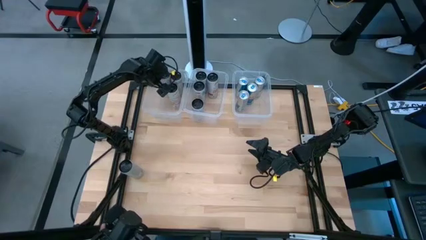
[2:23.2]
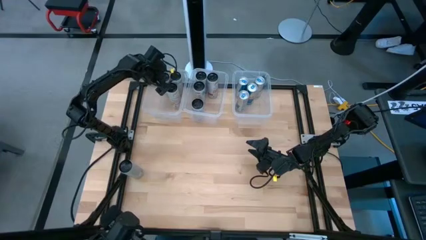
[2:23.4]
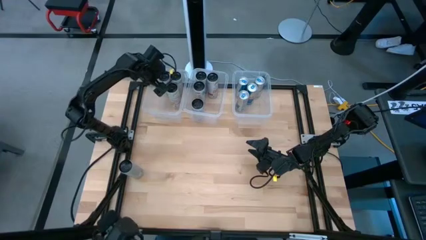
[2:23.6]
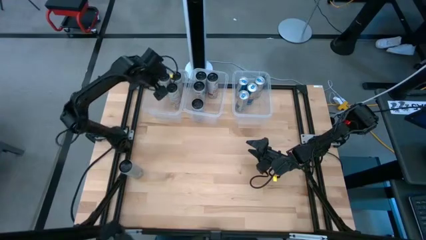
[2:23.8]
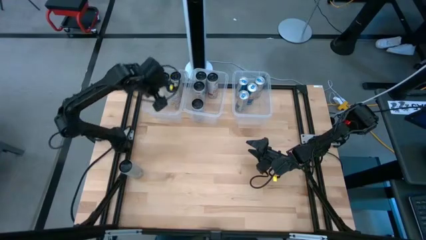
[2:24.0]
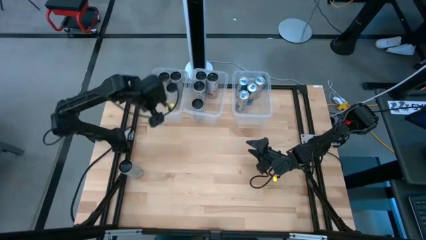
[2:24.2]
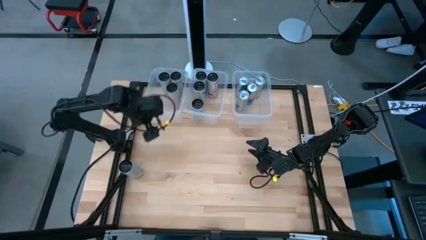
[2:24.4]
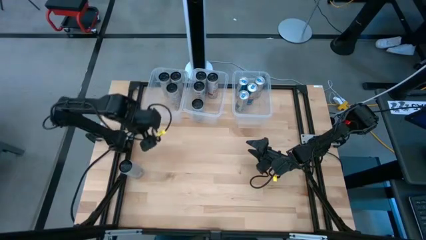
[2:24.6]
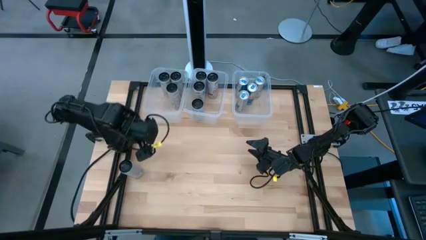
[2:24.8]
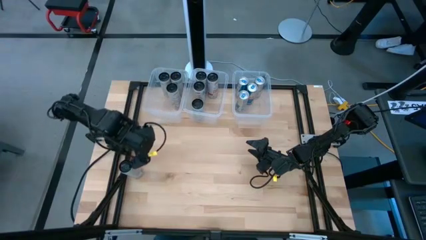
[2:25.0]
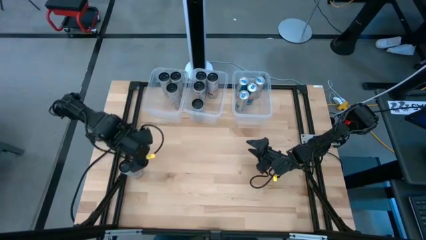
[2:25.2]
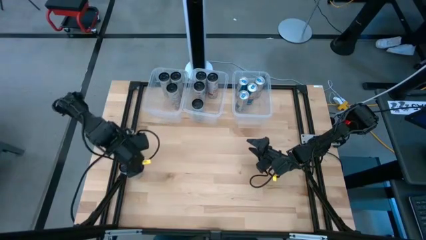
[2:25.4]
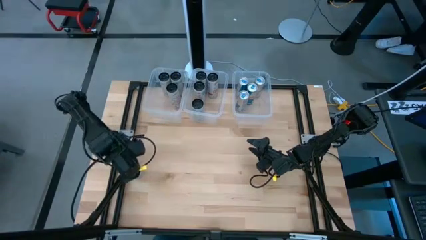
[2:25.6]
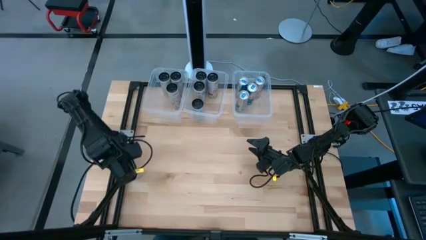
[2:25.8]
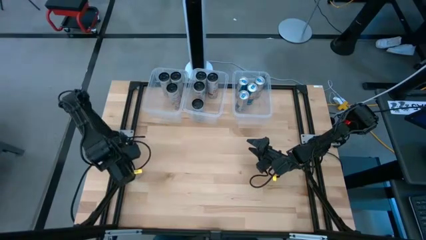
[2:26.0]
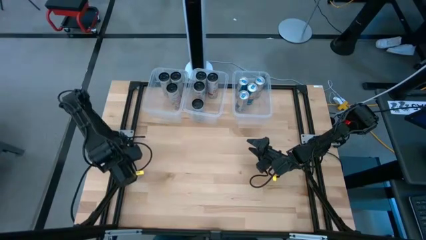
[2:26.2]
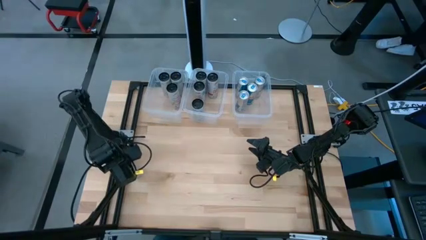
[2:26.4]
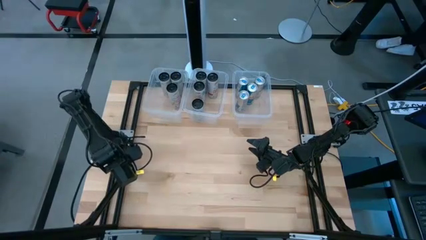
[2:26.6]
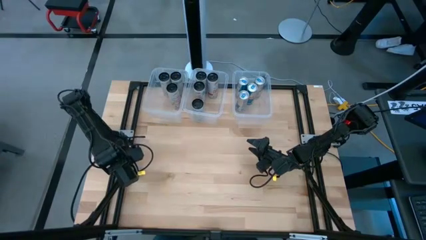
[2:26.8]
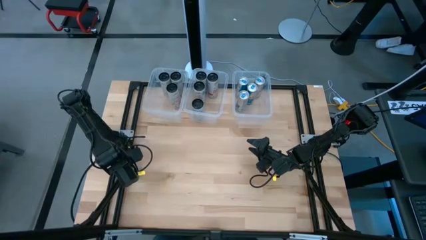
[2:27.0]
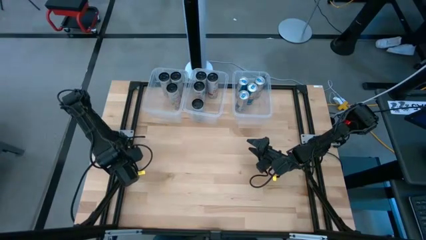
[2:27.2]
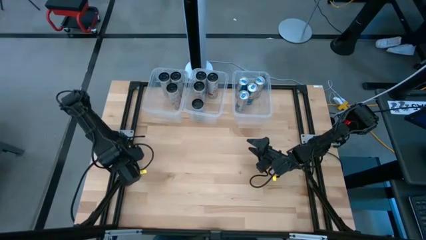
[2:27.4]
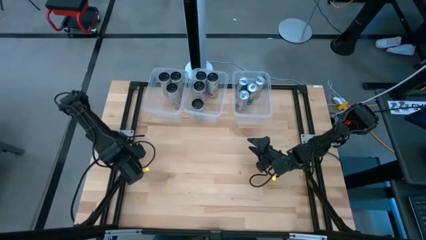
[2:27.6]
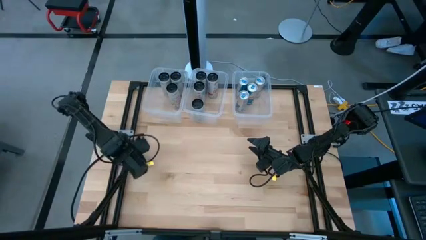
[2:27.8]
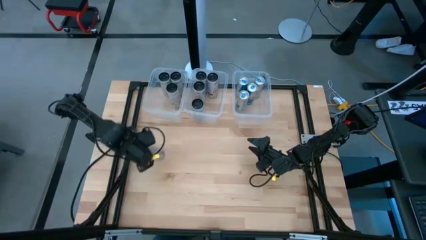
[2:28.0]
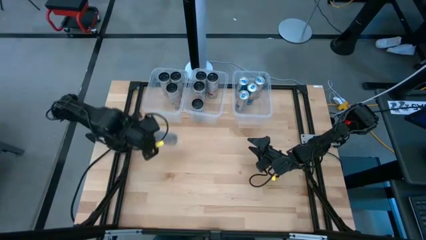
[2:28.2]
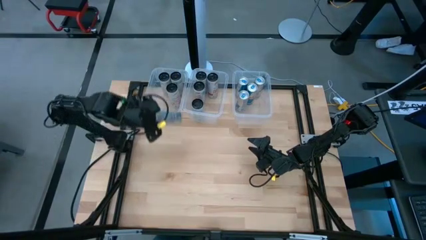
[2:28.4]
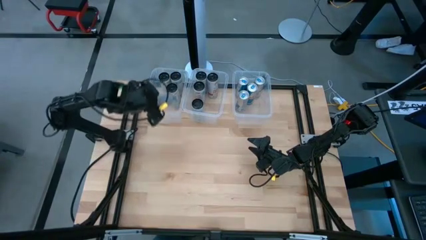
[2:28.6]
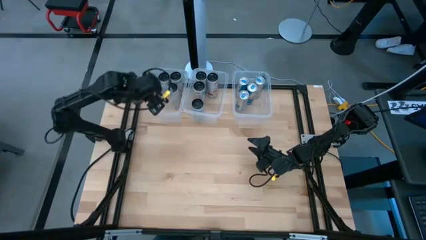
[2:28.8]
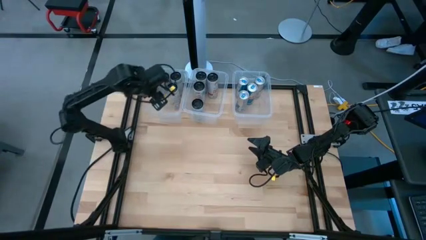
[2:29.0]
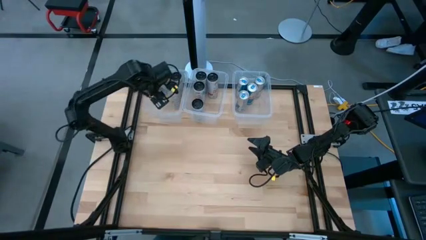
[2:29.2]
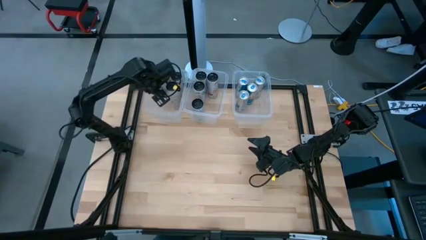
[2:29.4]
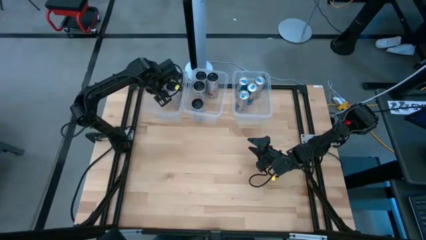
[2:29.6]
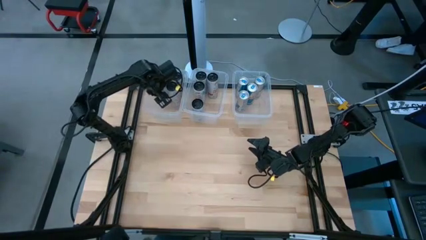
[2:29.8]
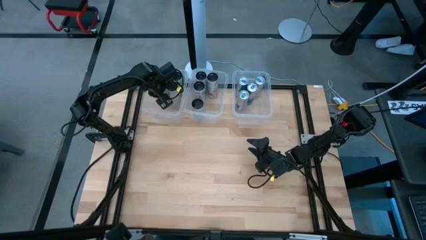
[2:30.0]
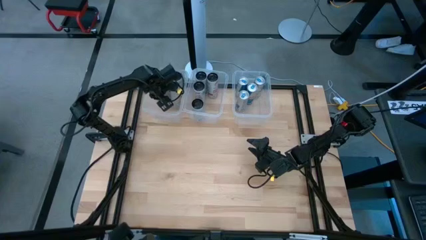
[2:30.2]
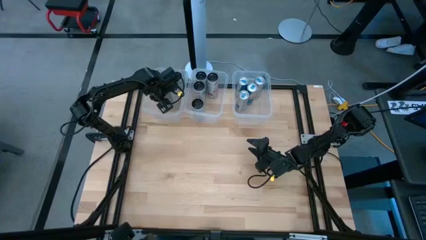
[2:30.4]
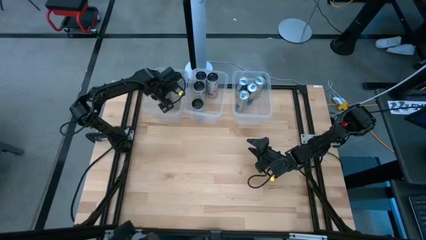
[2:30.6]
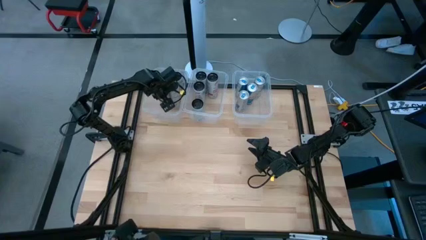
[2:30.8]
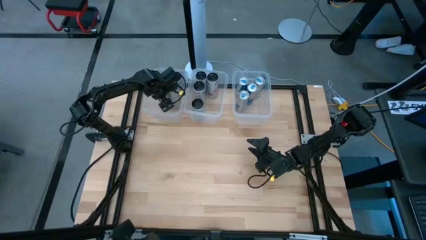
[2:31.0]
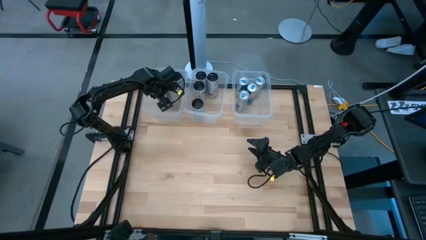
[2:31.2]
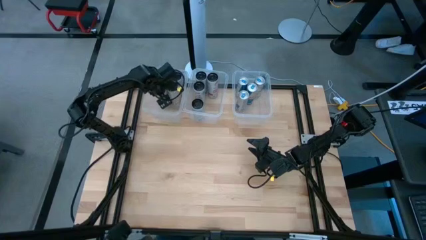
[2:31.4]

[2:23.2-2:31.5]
Task: Sort soda cans
Put the white-yellow soda can into the left transparent bin

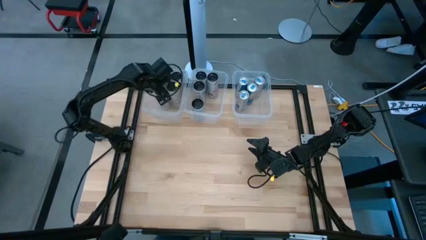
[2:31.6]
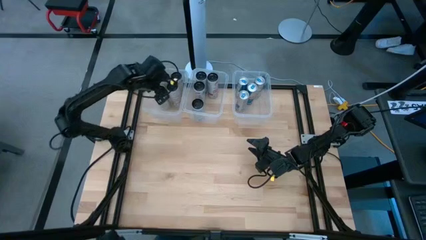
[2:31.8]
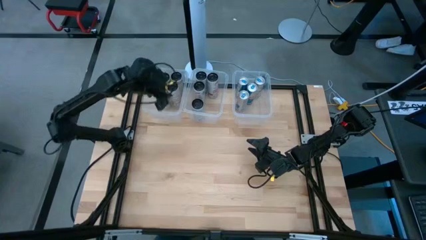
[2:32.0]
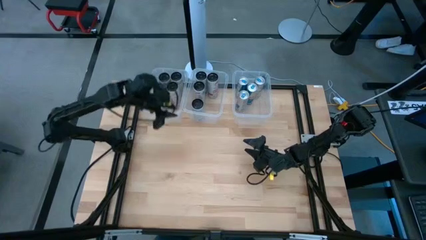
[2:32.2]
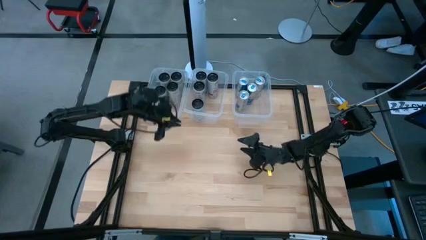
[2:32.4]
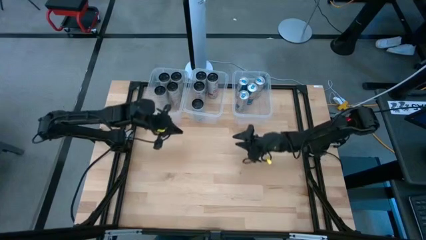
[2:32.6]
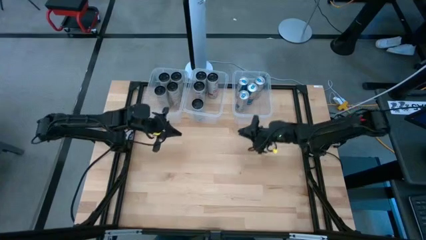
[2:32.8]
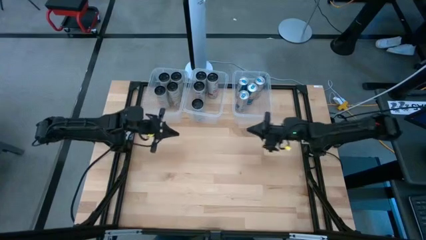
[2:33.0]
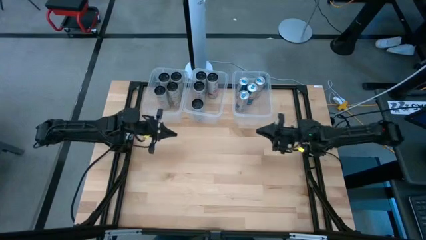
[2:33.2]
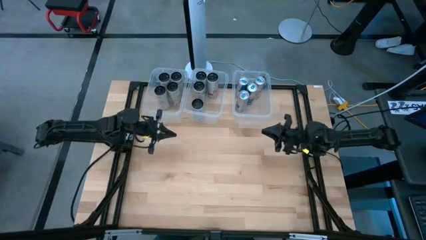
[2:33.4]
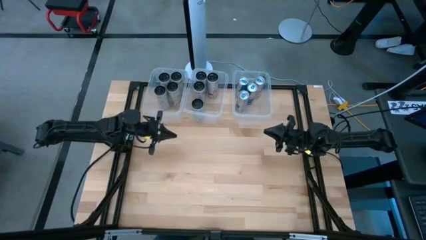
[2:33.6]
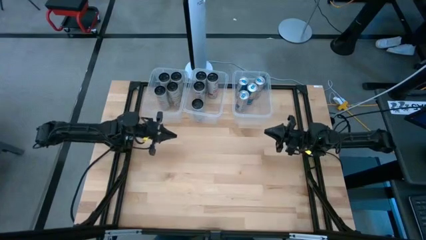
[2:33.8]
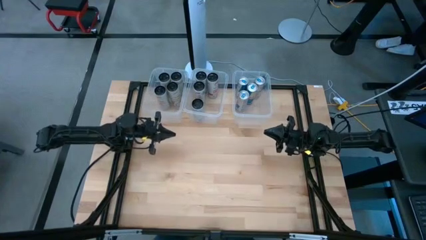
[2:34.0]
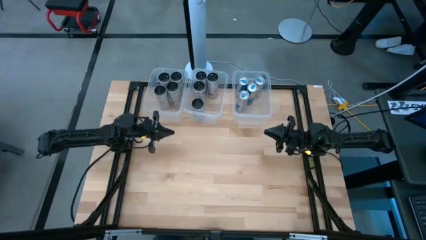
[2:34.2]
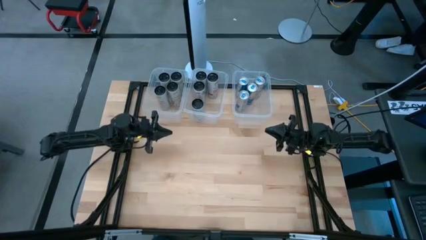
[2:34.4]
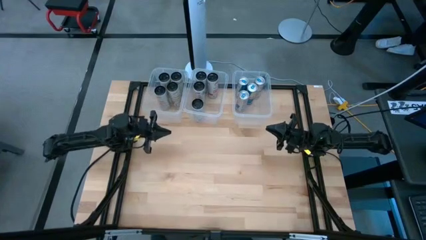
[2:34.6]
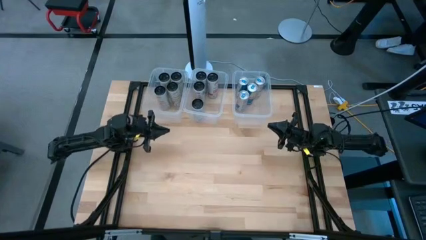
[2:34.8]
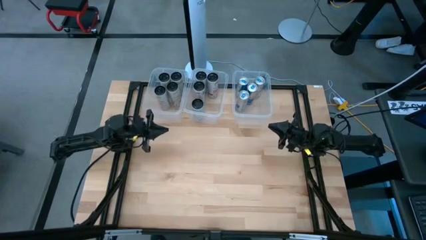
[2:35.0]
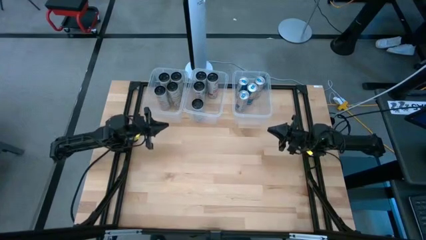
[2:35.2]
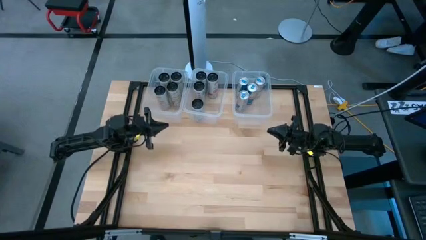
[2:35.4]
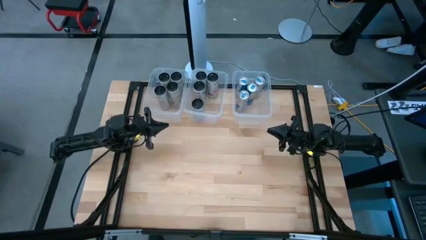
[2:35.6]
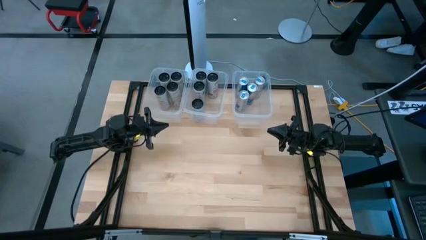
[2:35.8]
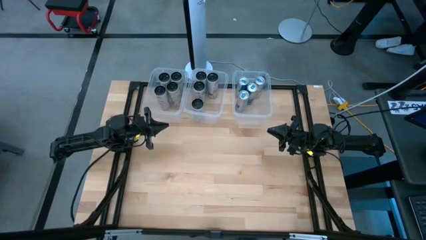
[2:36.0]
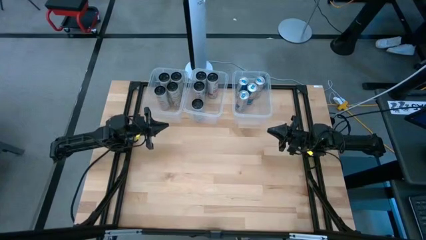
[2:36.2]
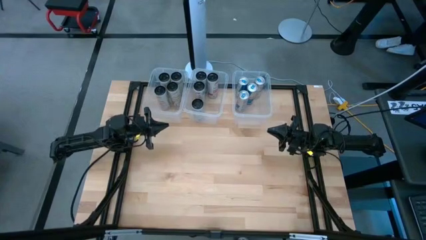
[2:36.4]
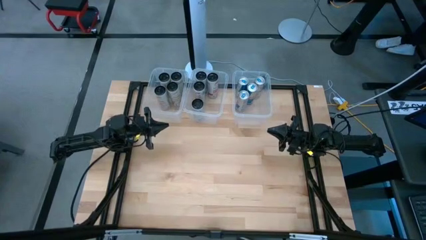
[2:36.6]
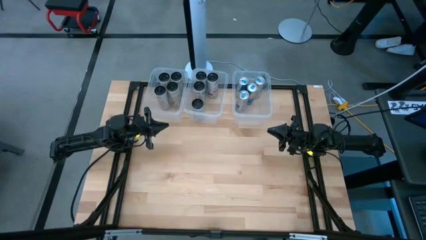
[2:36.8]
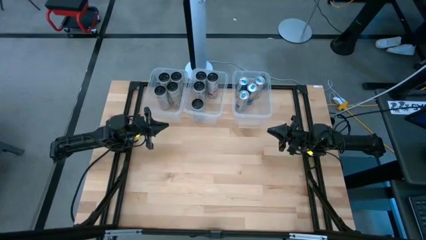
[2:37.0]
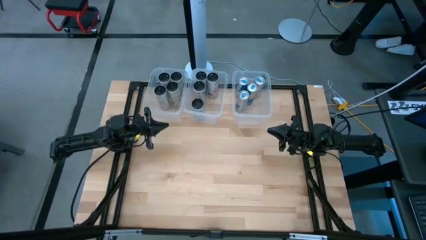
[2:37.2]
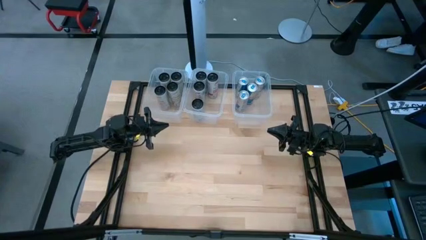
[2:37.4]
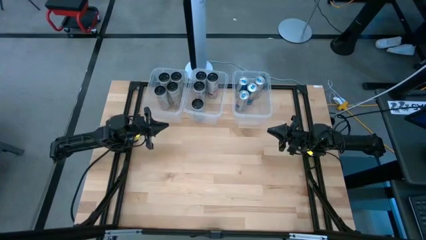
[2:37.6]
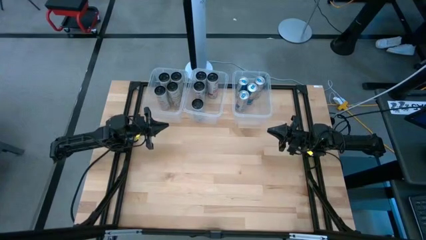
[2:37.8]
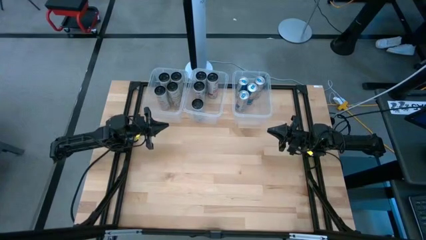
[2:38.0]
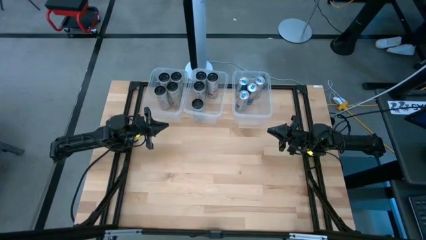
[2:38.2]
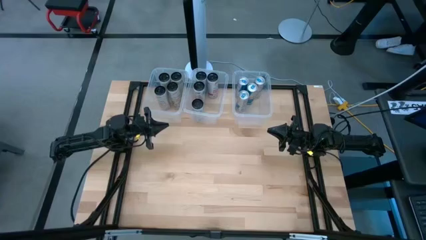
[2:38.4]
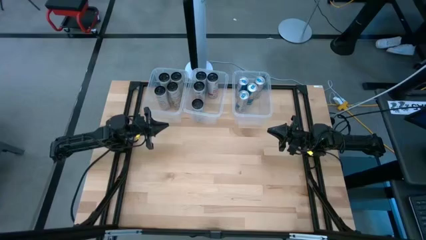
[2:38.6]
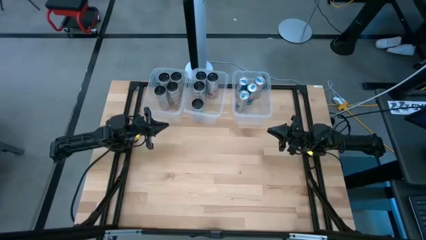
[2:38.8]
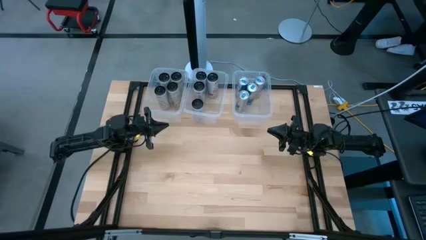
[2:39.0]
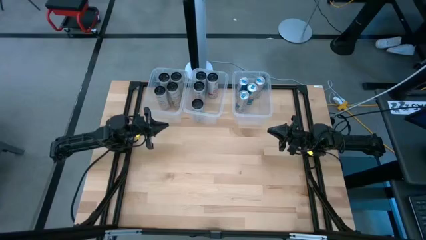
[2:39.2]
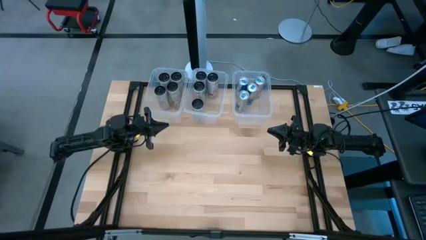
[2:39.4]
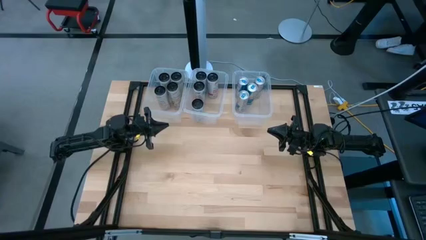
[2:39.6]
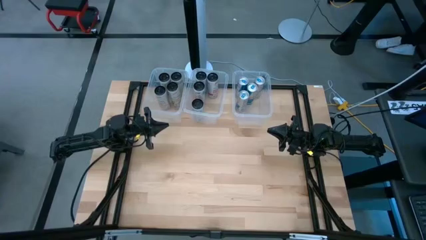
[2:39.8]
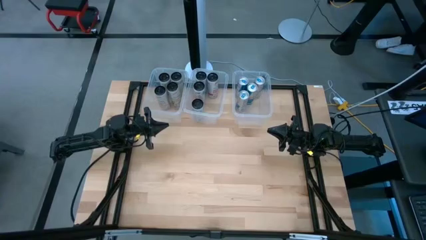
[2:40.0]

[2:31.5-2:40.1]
Return to Home Position
